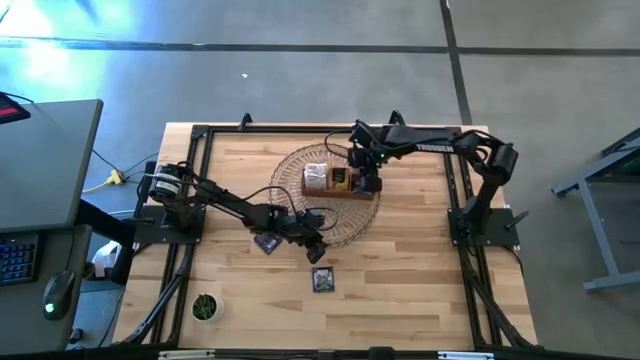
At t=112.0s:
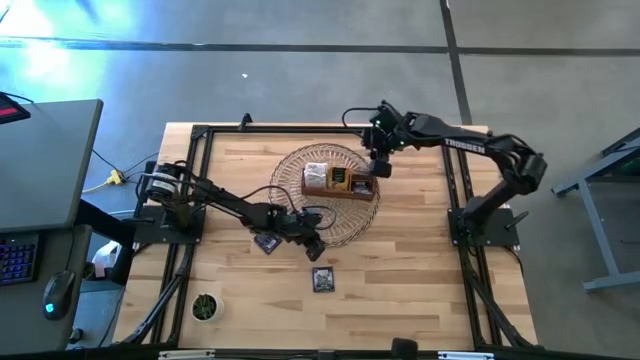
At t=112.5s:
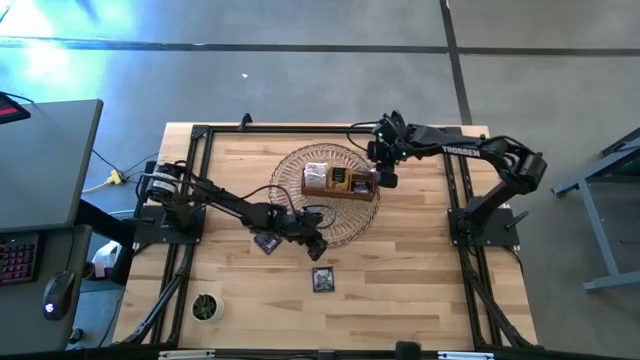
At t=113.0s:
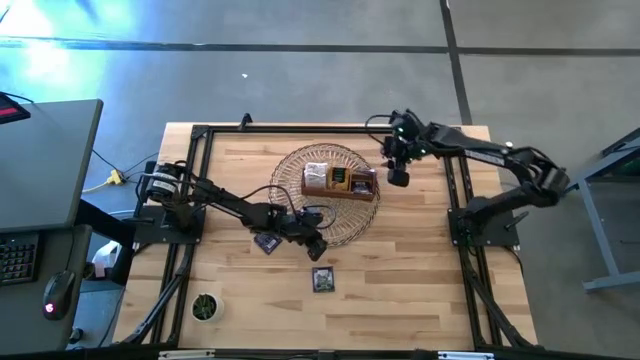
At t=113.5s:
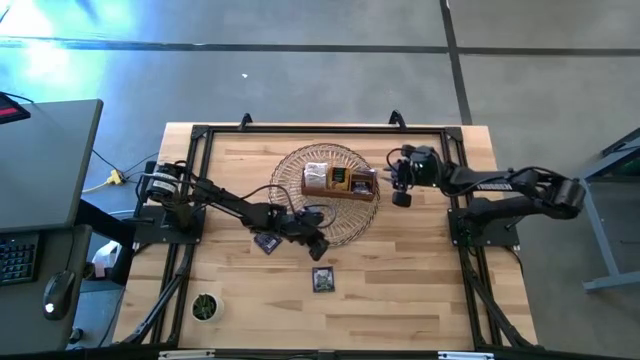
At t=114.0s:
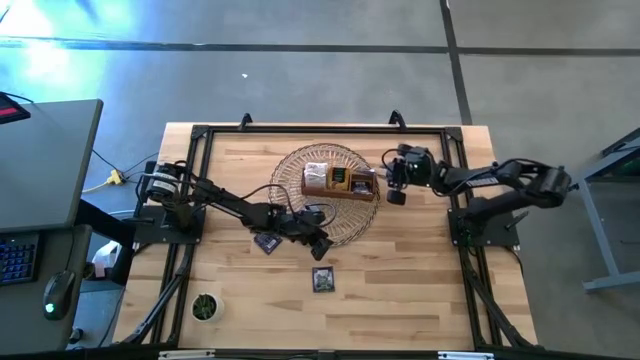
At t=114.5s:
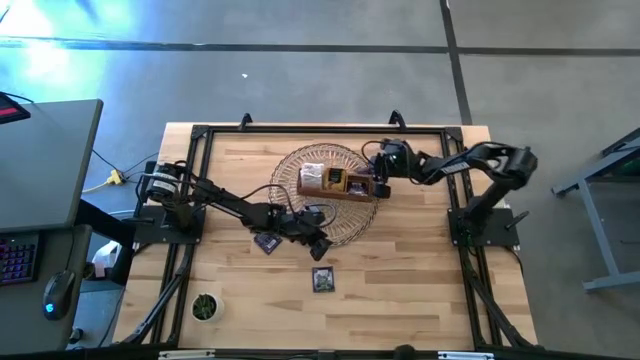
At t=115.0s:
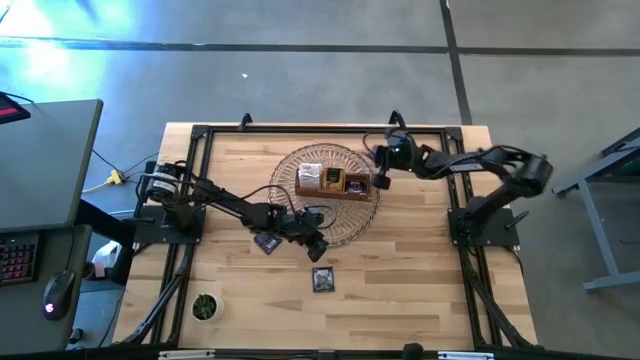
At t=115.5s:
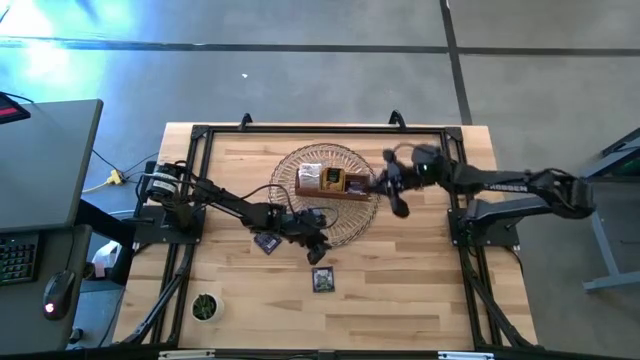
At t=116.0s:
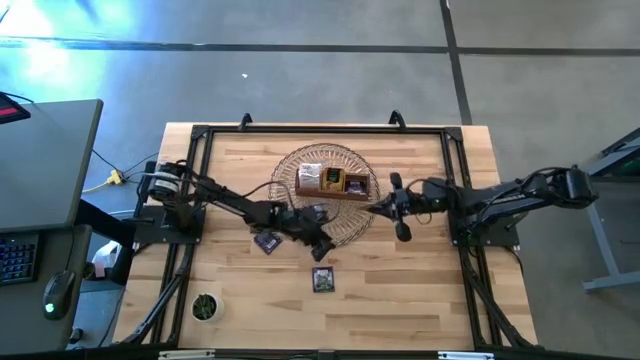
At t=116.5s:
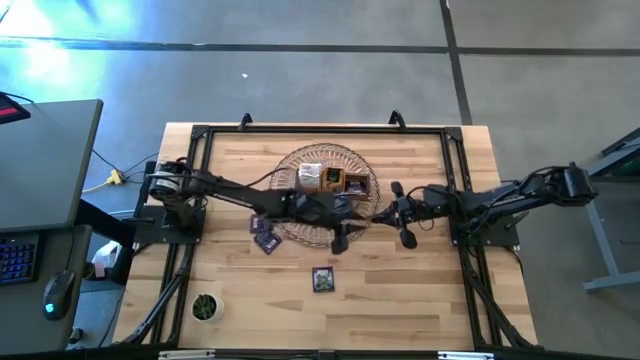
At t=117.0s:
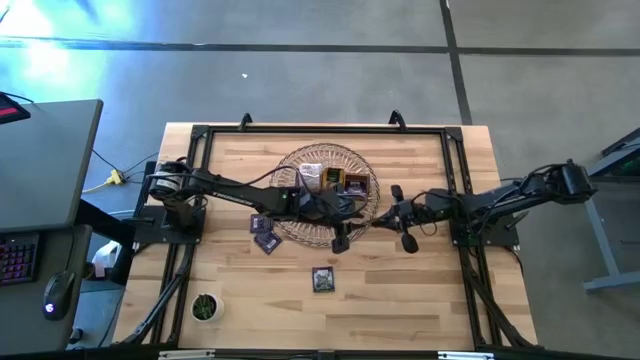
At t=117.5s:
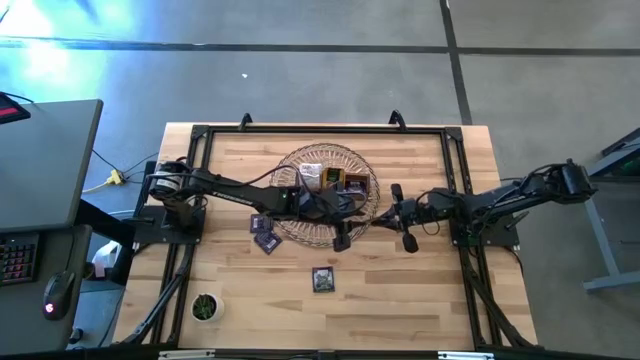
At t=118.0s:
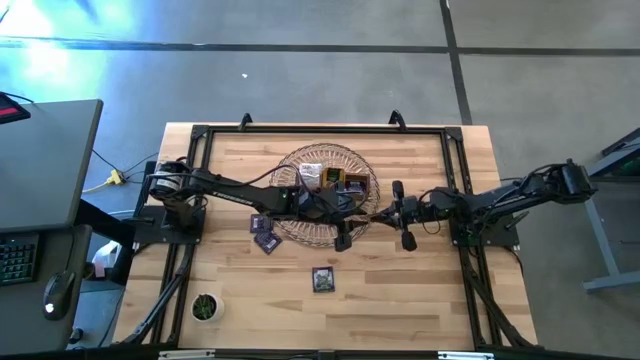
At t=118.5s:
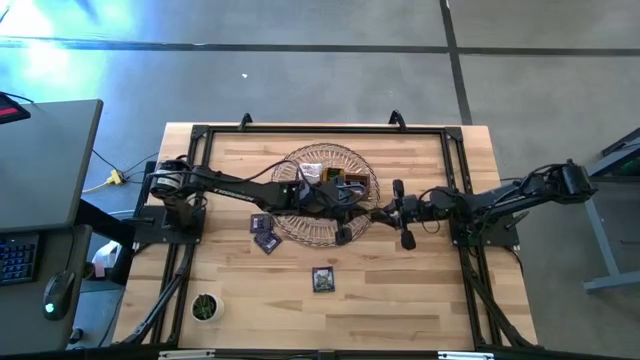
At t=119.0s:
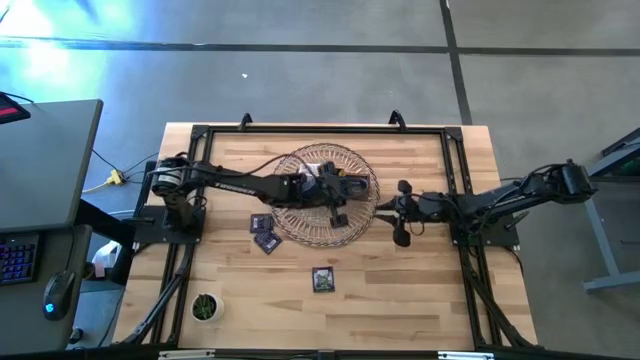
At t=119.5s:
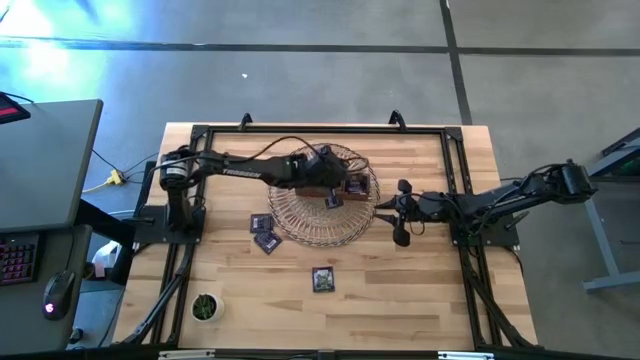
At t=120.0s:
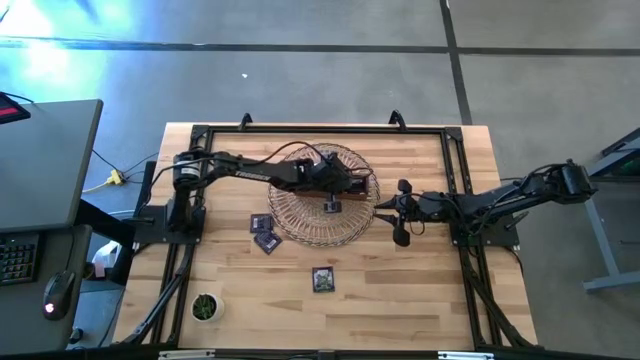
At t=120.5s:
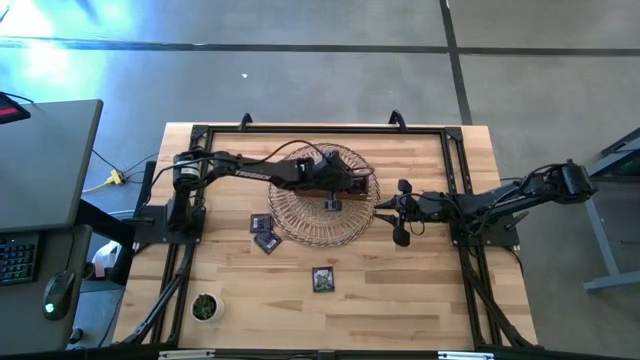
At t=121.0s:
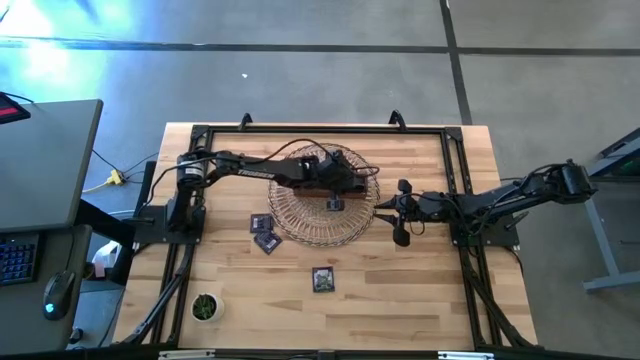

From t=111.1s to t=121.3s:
Task: Pick & Place Tea
Put the purple tea bag into the right section of the wooden organizer

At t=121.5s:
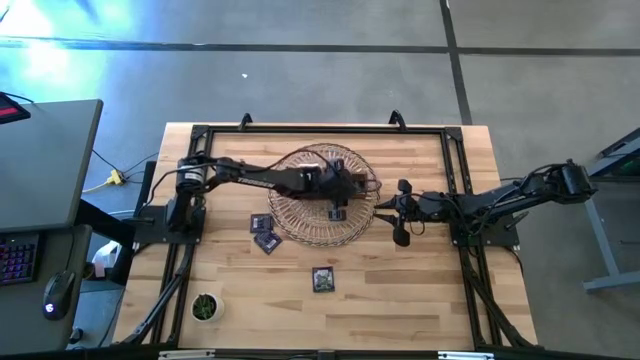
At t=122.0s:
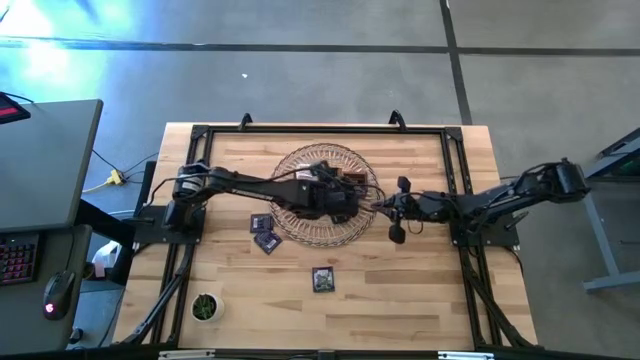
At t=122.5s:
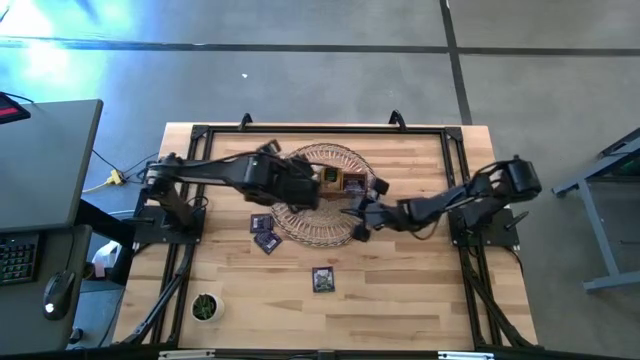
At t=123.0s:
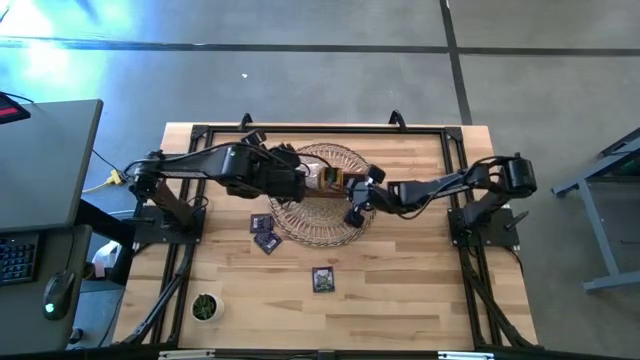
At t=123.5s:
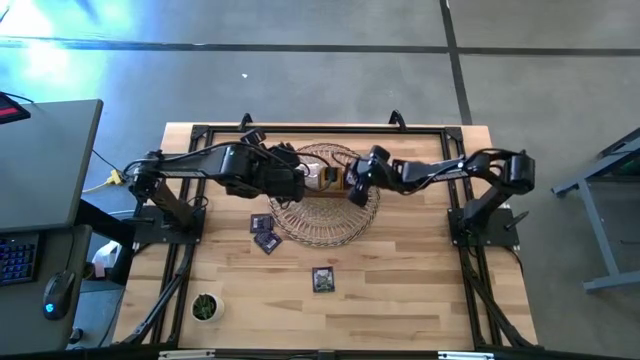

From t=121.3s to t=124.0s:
Adjust the purple tea bags in the right section of the wooden organizer

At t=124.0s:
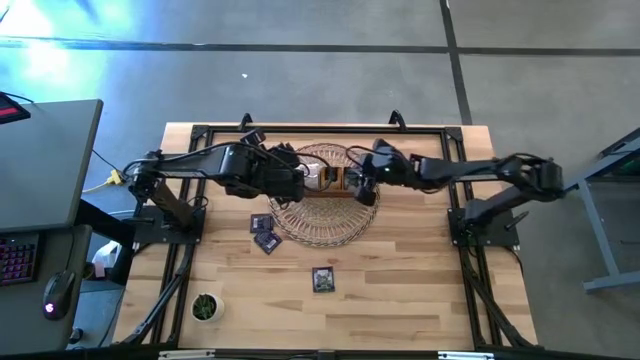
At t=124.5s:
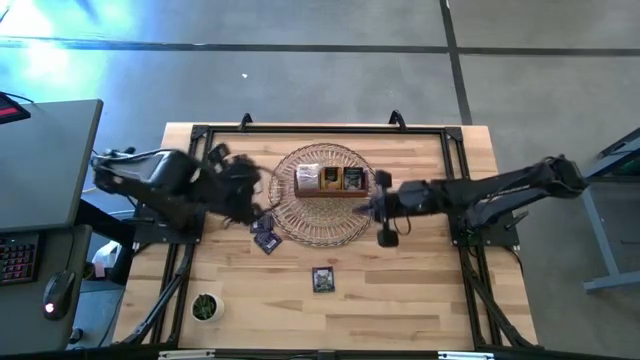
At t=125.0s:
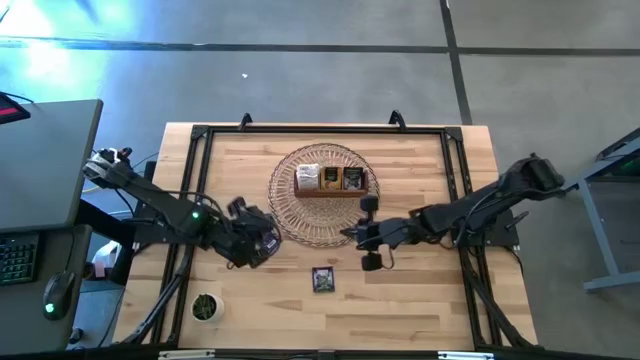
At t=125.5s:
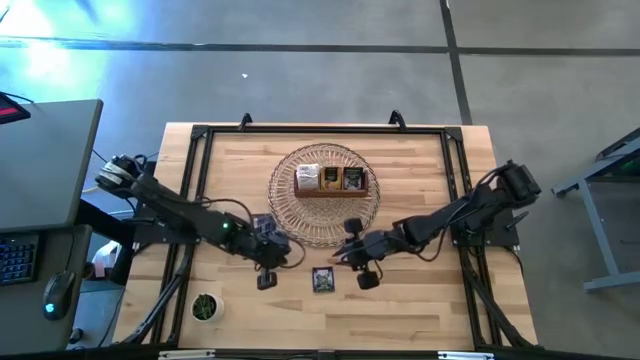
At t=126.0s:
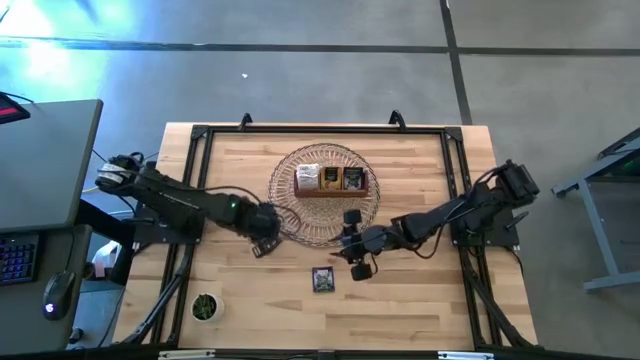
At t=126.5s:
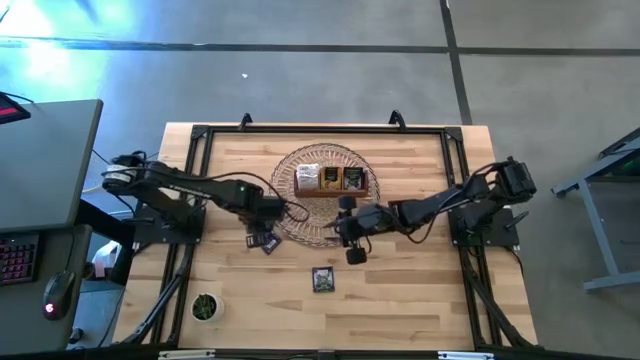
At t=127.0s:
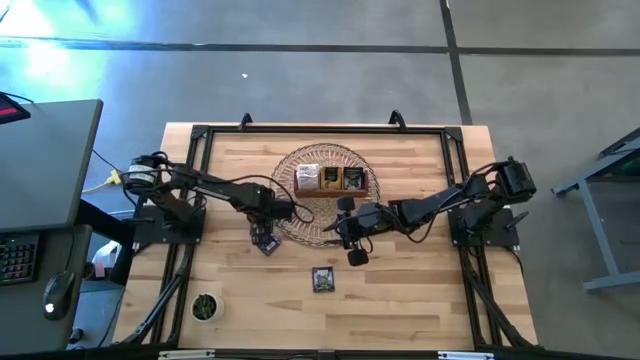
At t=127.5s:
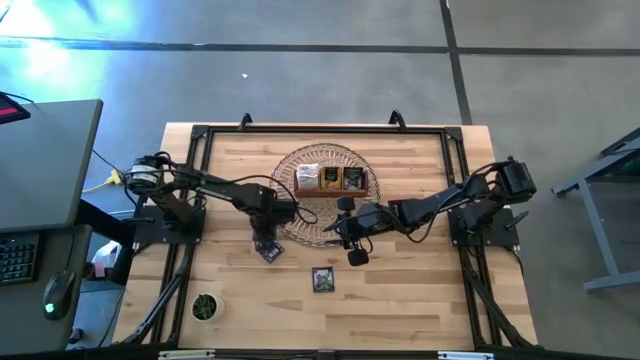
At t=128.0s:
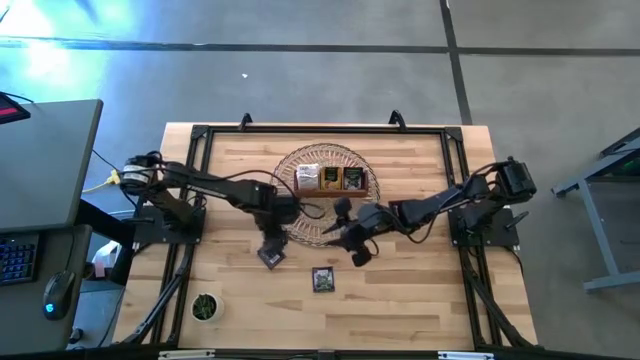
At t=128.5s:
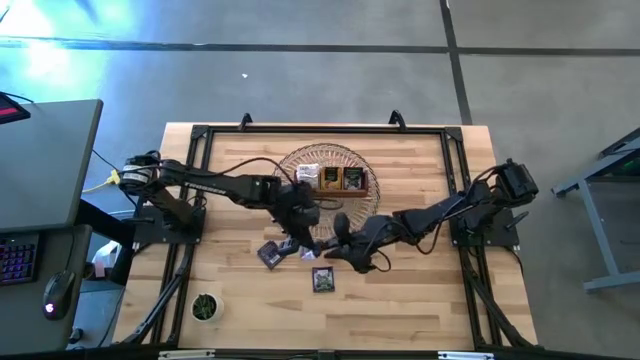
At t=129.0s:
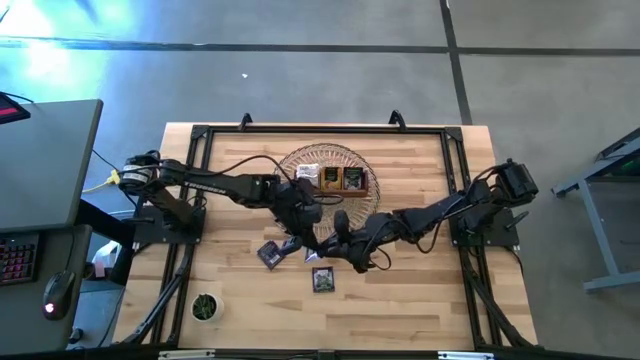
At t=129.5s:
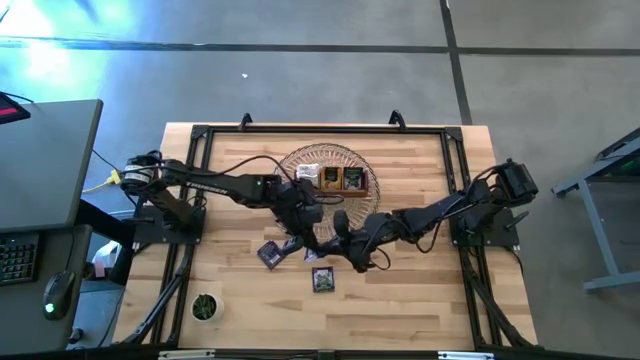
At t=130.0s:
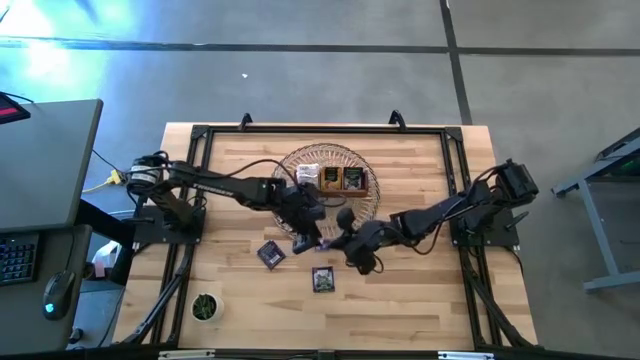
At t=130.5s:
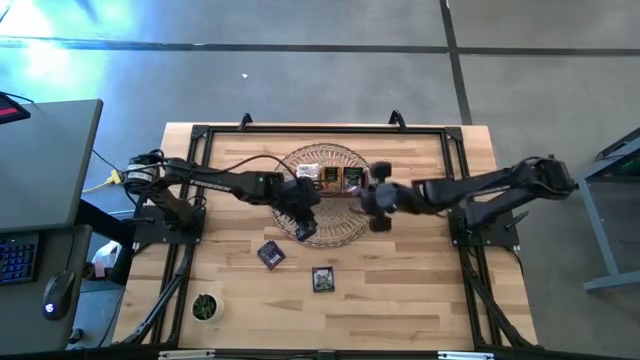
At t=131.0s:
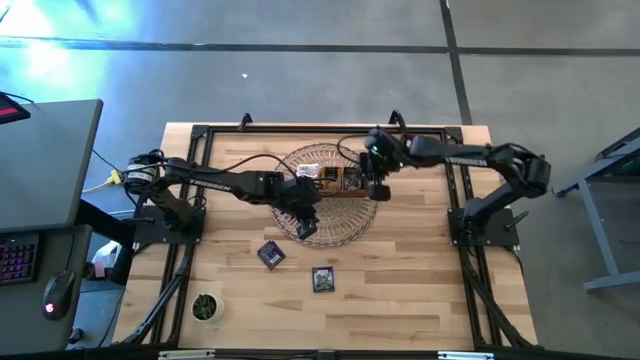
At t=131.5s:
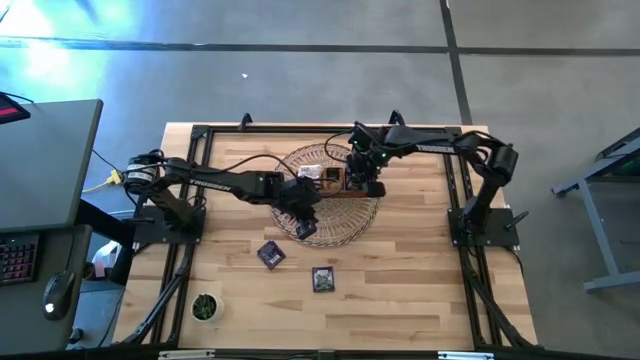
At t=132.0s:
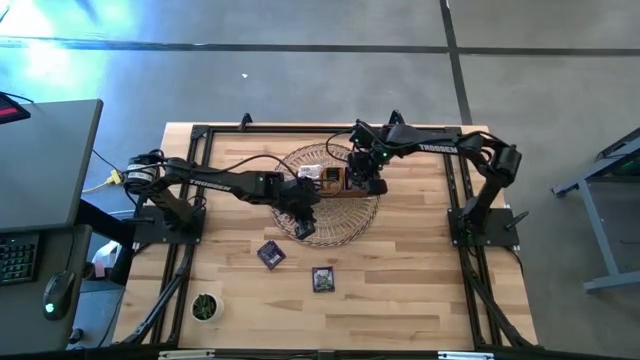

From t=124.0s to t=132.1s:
Put the purple tea bag into the right section of the wooden organizer
